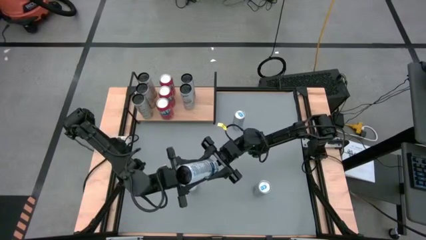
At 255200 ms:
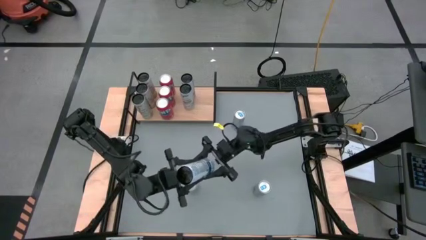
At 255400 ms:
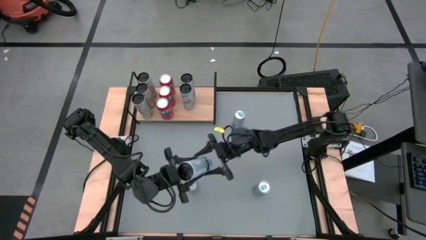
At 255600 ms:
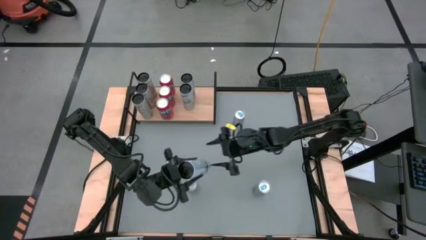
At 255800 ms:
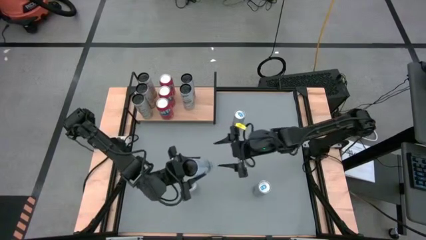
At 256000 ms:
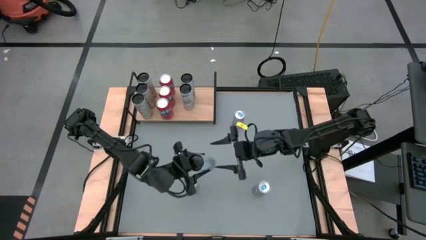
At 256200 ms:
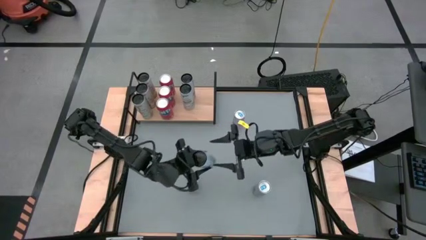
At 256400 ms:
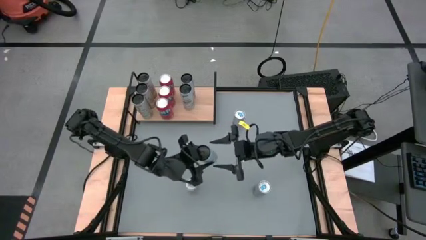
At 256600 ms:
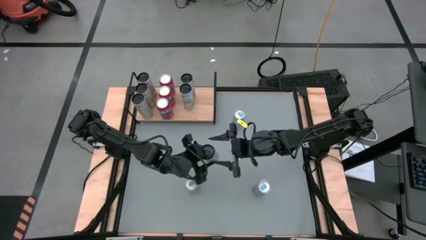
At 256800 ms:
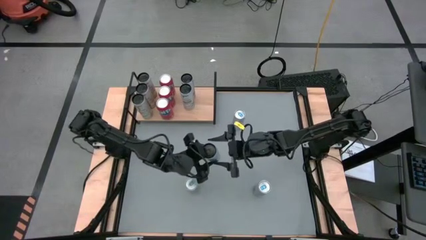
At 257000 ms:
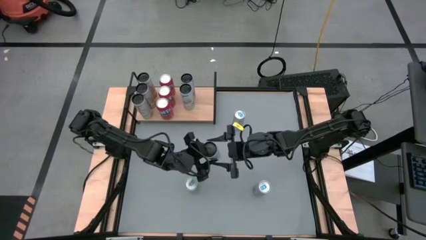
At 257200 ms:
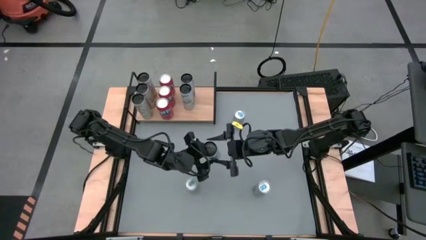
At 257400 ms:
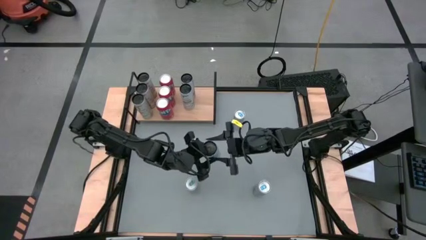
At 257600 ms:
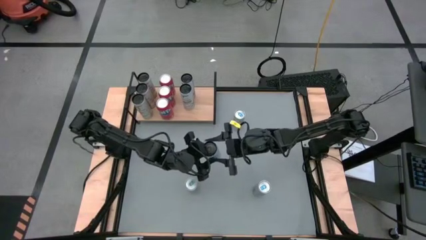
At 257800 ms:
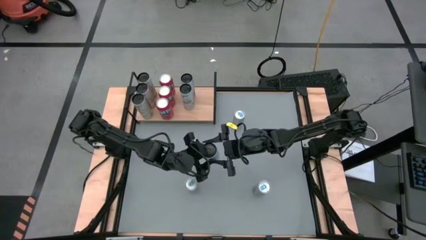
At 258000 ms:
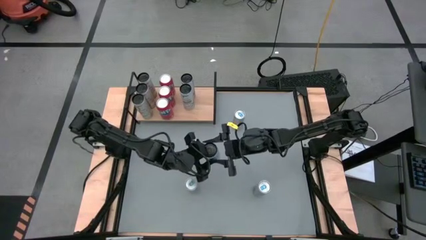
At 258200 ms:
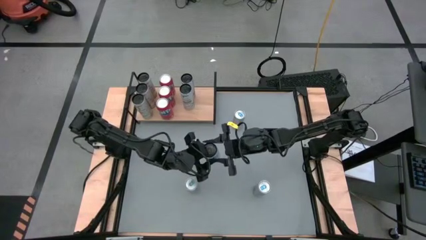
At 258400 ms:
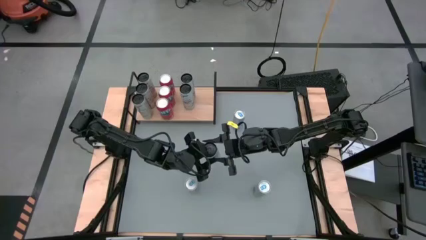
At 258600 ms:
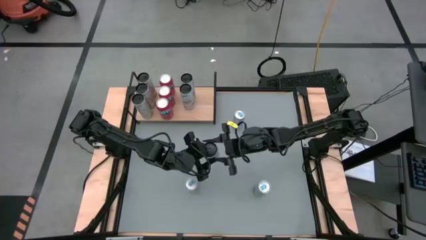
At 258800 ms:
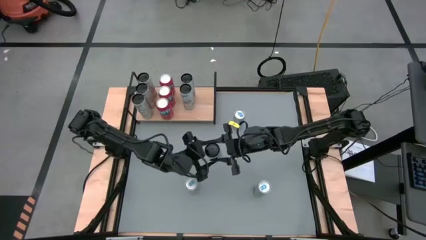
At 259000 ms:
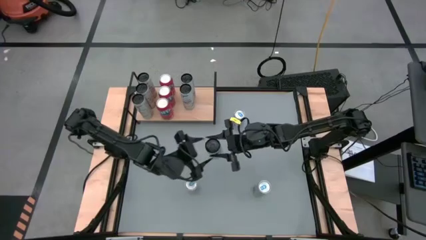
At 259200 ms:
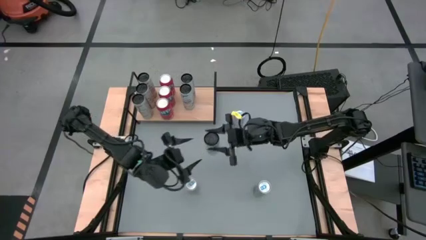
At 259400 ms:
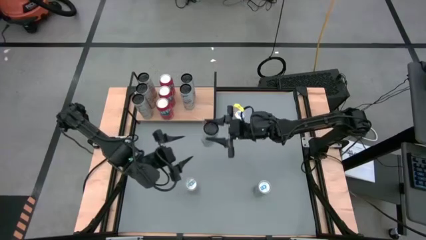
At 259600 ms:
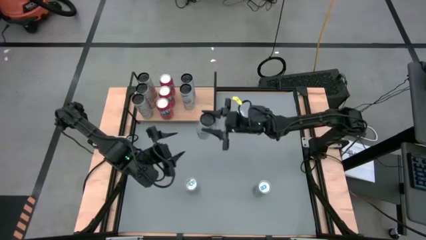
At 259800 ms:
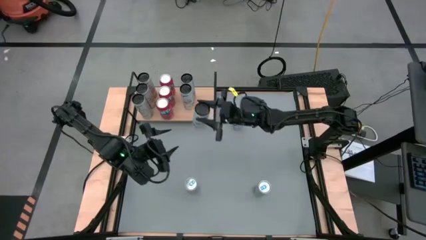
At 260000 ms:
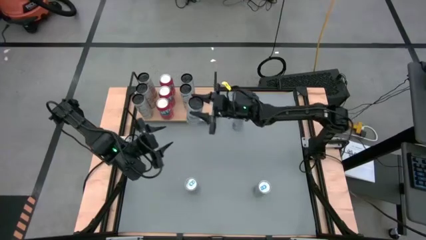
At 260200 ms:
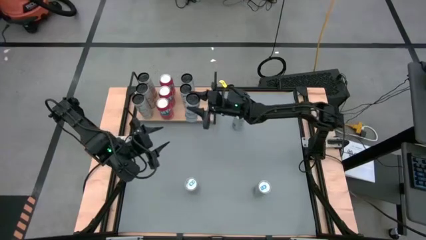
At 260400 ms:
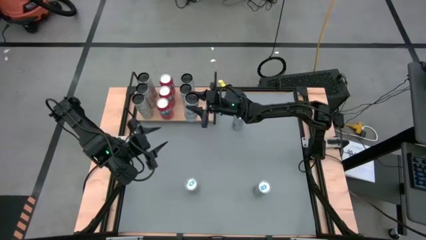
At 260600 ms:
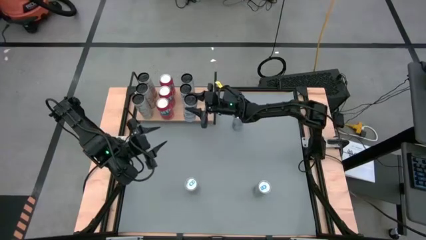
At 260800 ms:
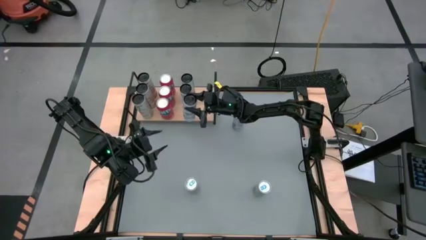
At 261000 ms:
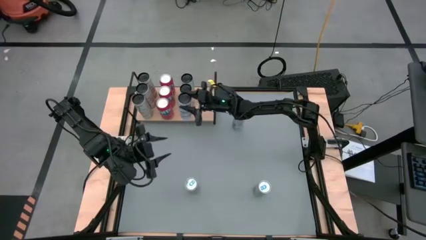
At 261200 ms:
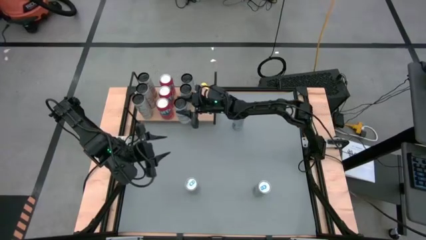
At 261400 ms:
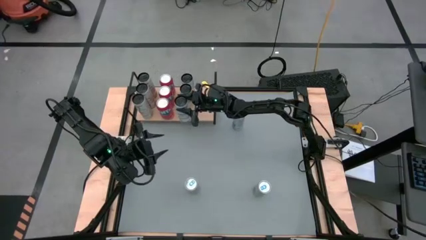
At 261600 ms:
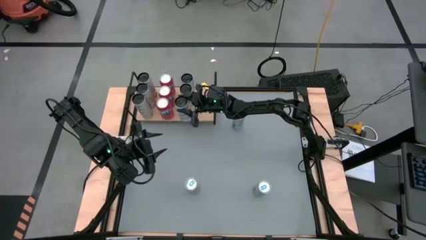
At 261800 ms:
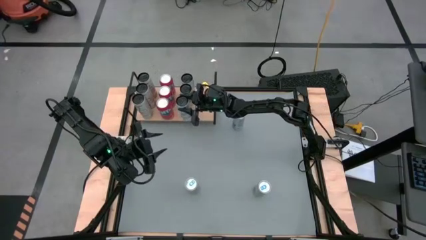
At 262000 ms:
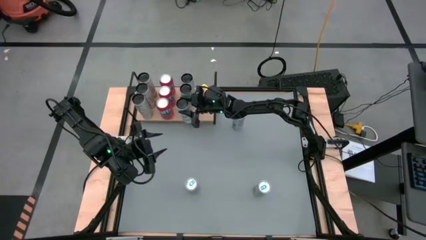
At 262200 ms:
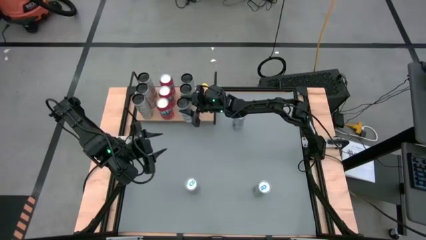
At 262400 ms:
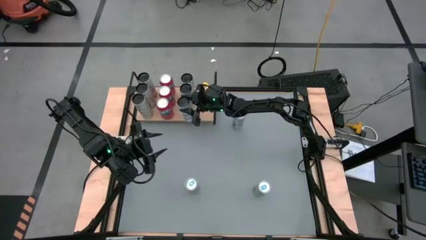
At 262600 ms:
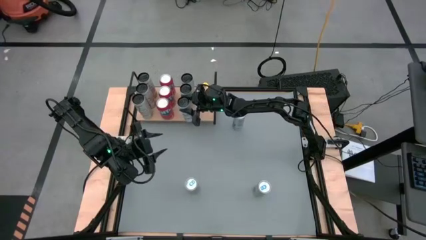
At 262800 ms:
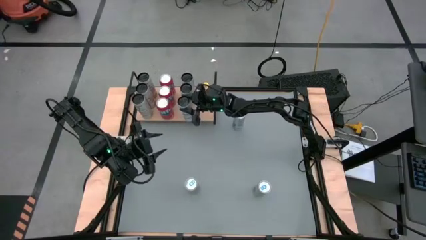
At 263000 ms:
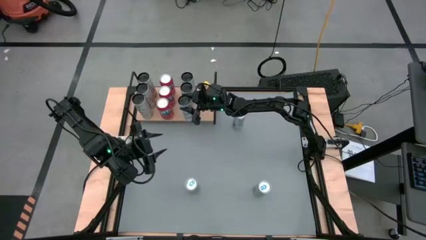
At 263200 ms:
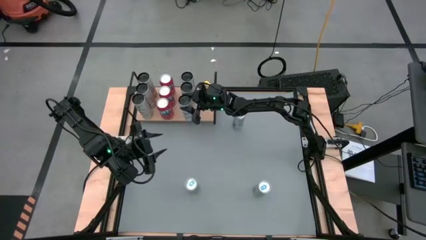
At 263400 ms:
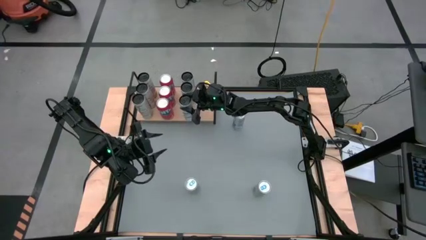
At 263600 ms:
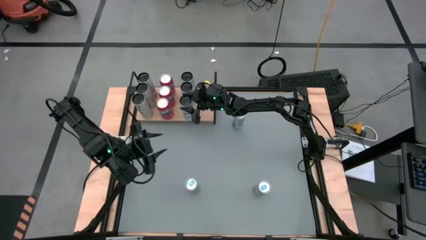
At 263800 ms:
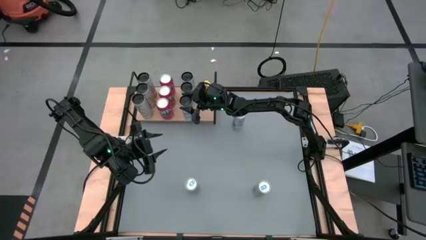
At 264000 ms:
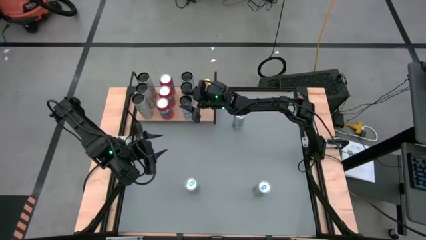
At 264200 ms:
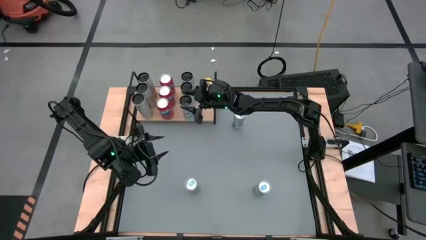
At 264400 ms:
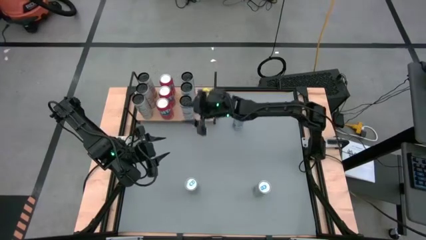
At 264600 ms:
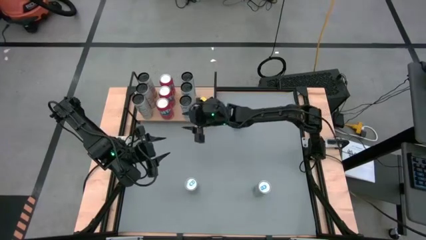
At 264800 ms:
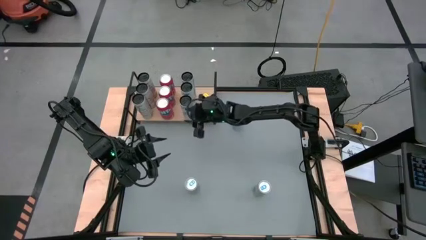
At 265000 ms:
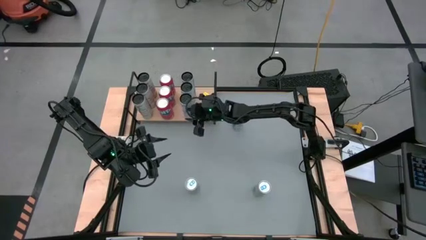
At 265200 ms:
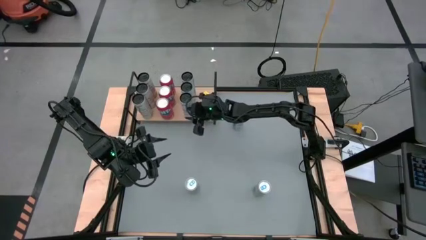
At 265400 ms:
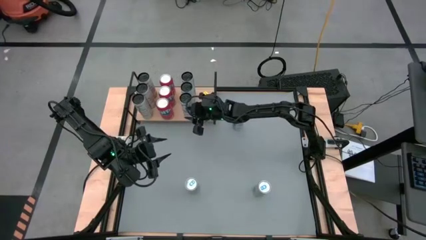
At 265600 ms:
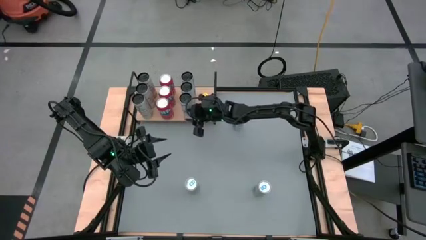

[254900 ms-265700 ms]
Task: Place canned beverage on shelf
Put the white-blue soda can on the shelf aligned with the other white-blue soda can
